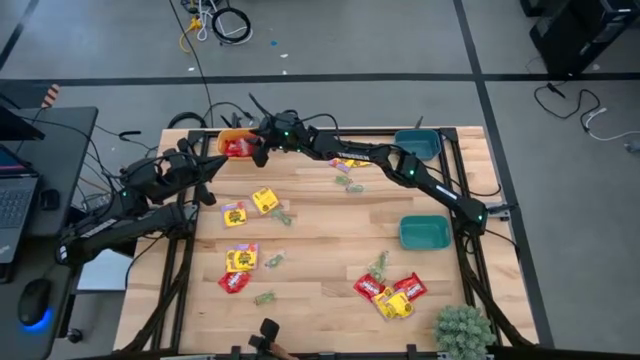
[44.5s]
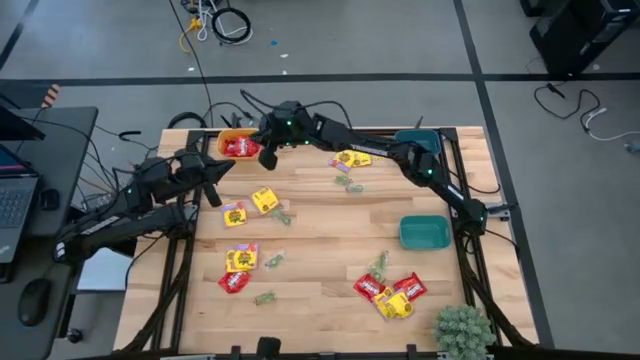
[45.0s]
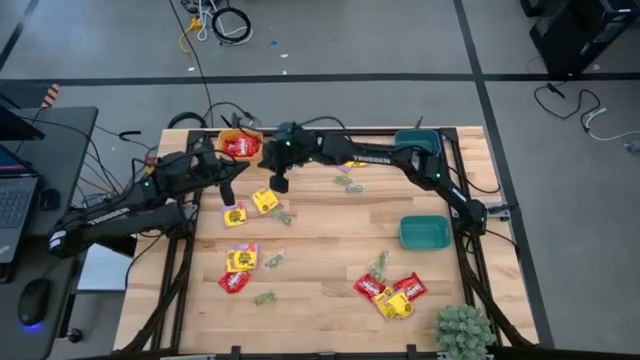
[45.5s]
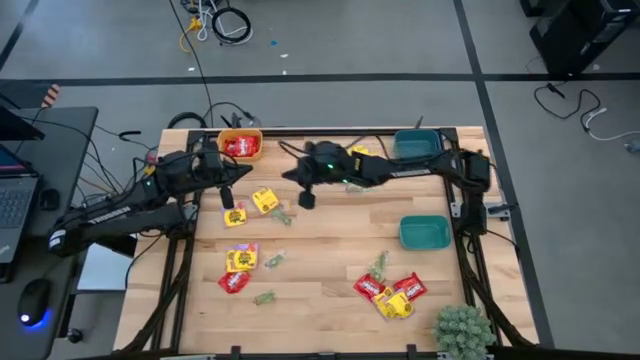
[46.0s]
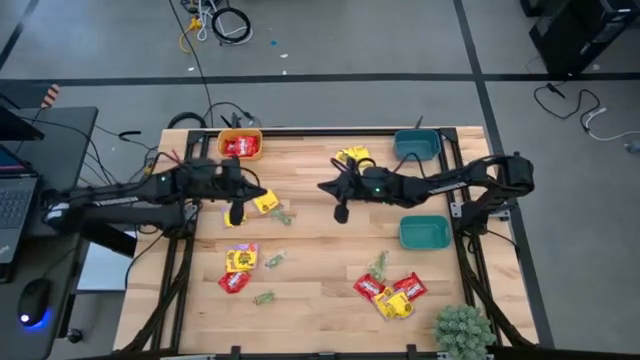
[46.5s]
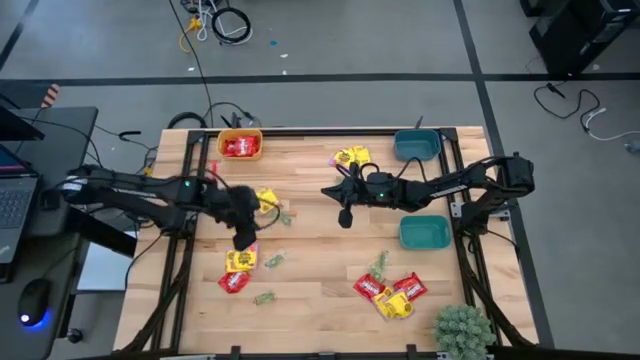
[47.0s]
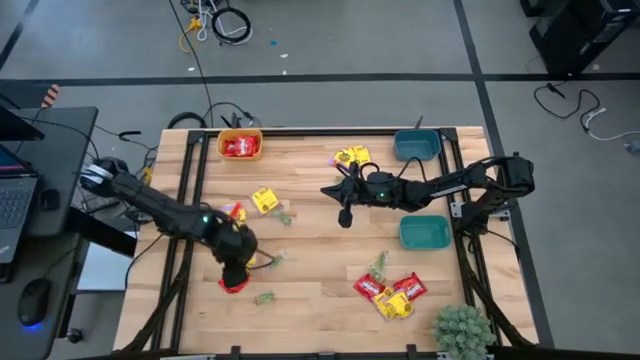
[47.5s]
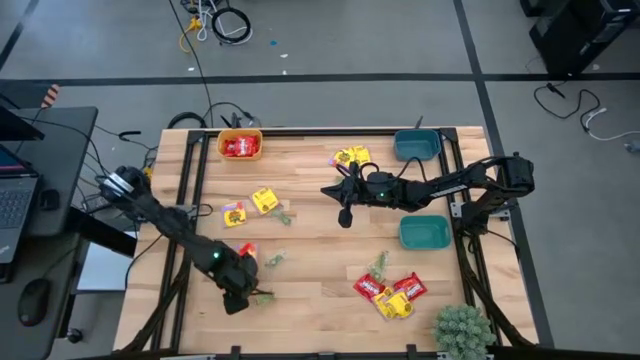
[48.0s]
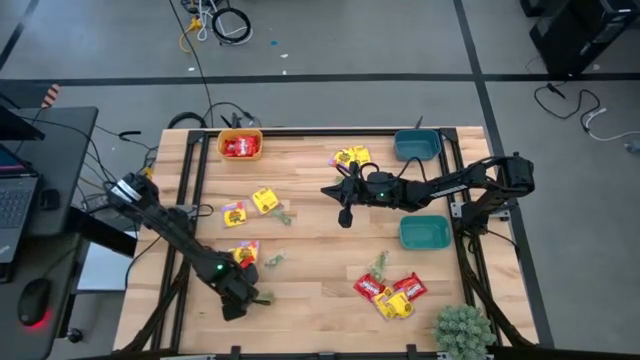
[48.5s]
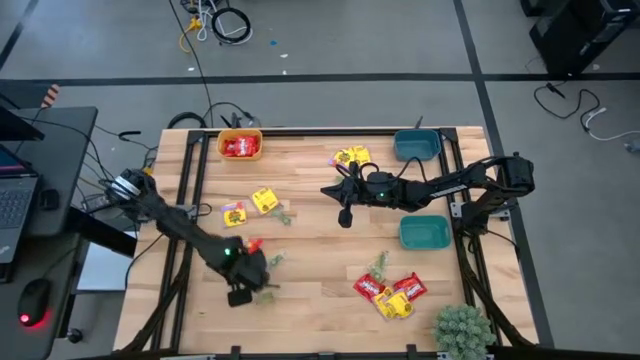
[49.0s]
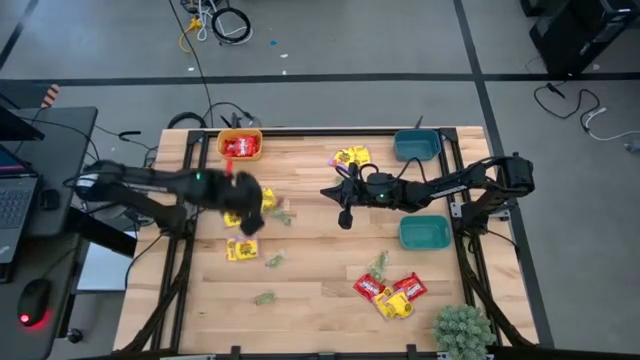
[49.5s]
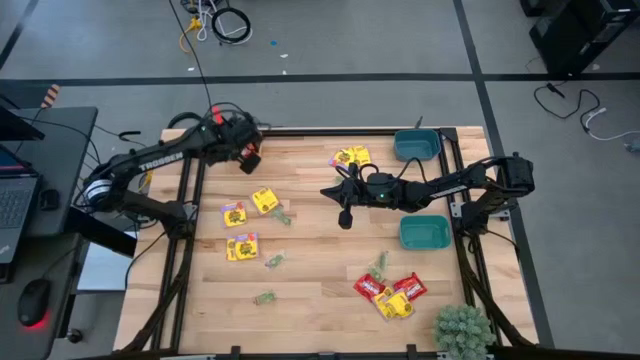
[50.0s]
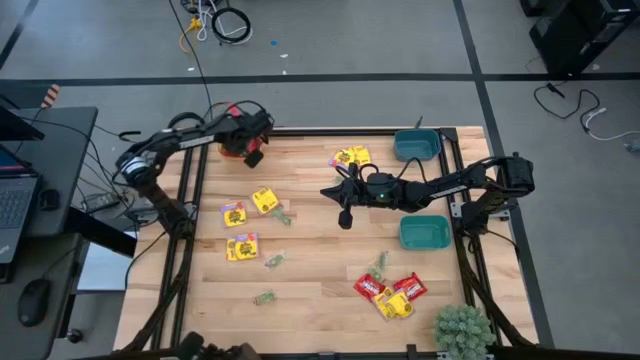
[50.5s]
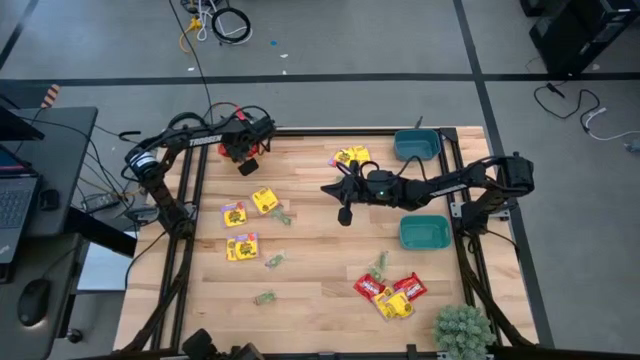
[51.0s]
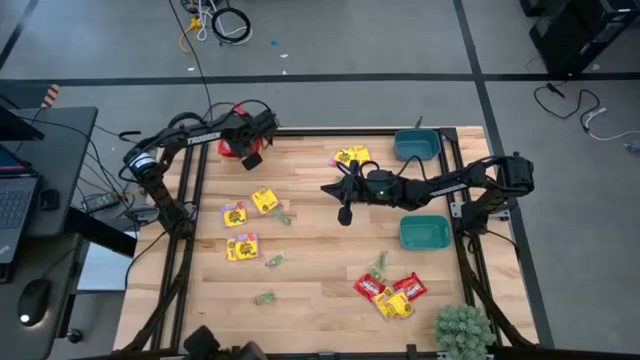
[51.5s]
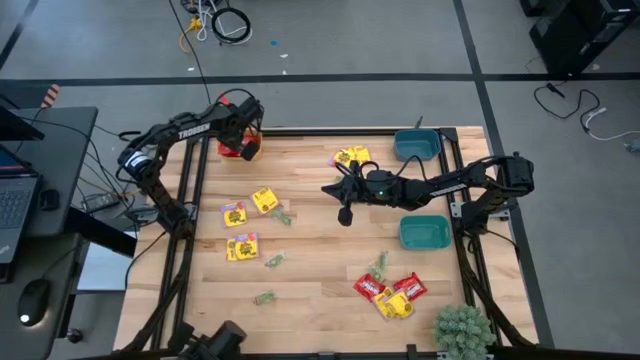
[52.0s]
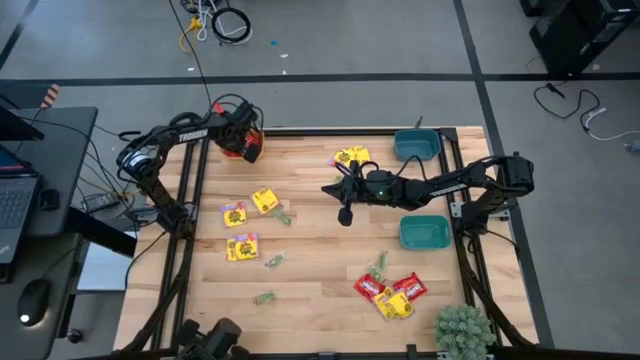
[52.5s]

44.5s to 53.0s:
Task: Sort candy
Put the red candy into the yellow bin

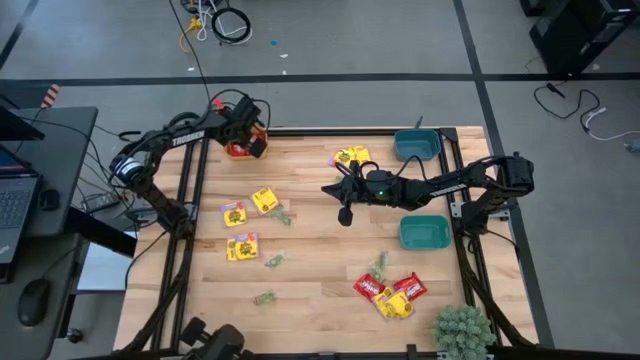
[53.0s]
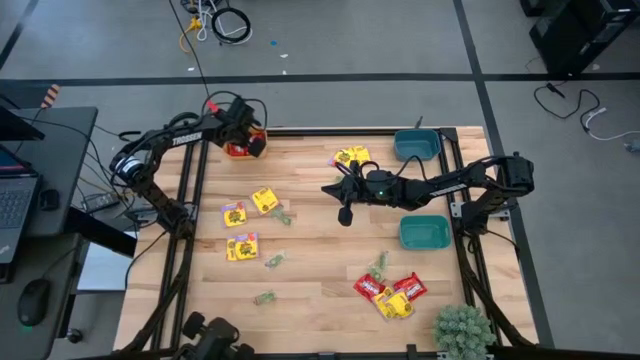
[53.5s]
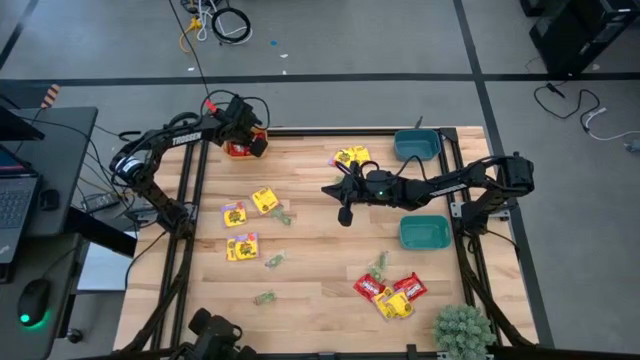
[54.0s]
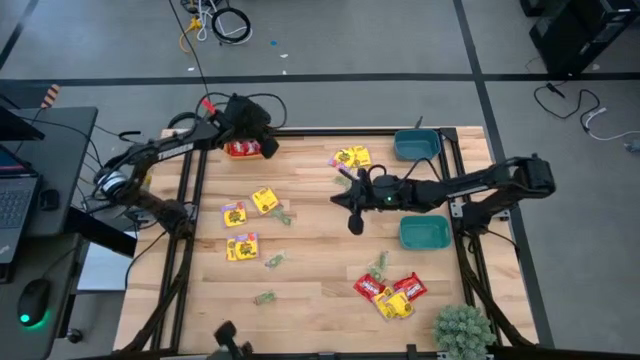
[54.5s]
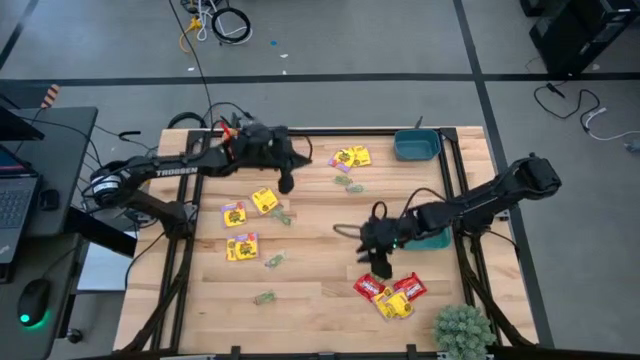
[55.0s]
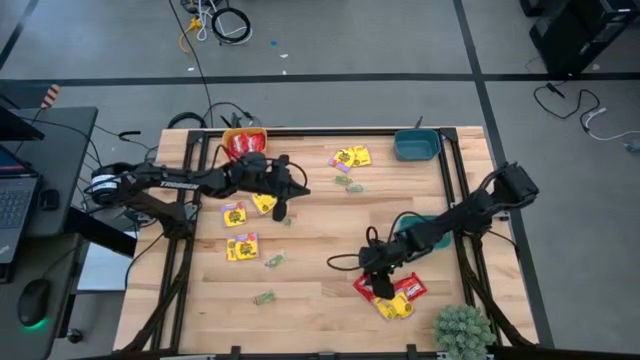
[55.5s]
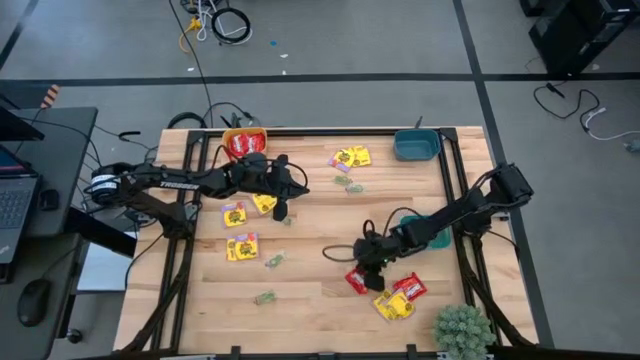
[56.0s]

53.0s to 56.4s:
Put the red candy into the yellow bin

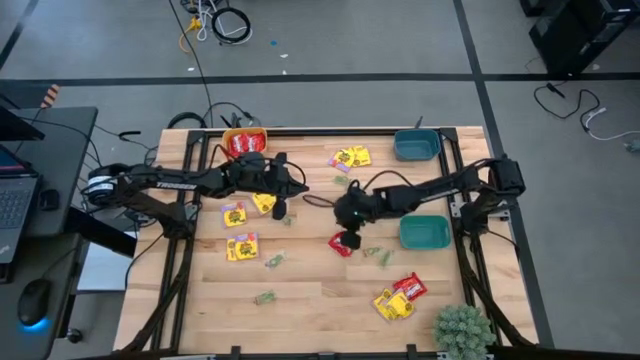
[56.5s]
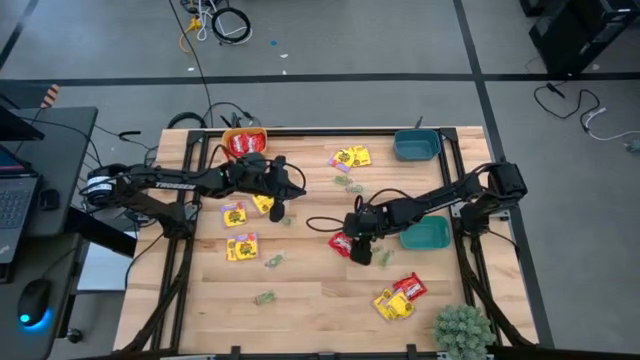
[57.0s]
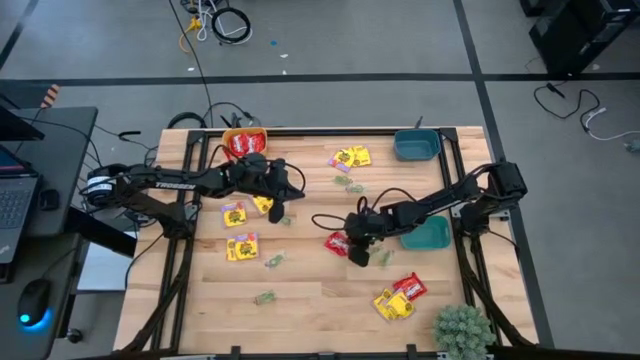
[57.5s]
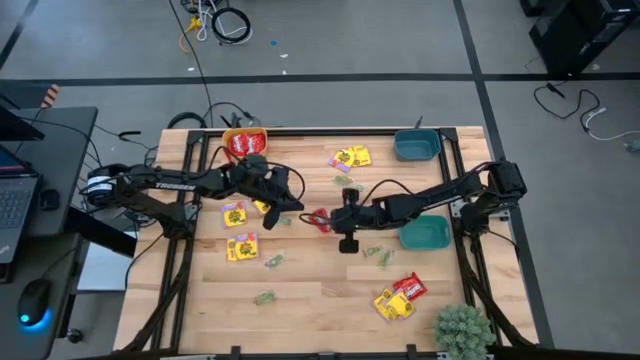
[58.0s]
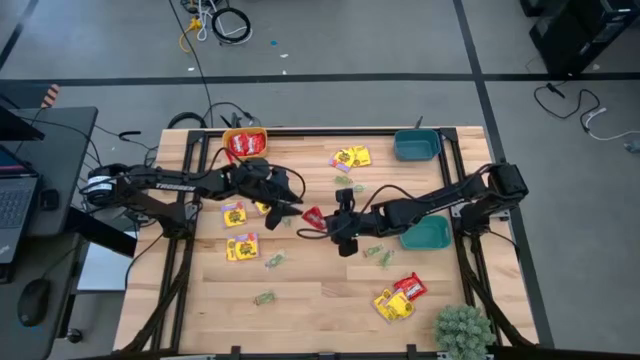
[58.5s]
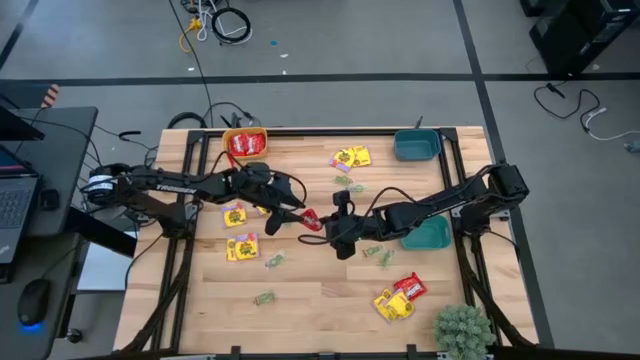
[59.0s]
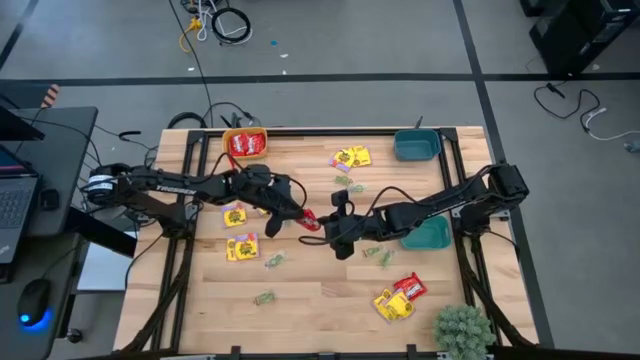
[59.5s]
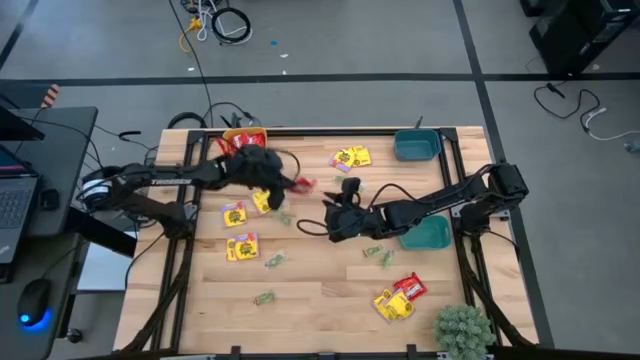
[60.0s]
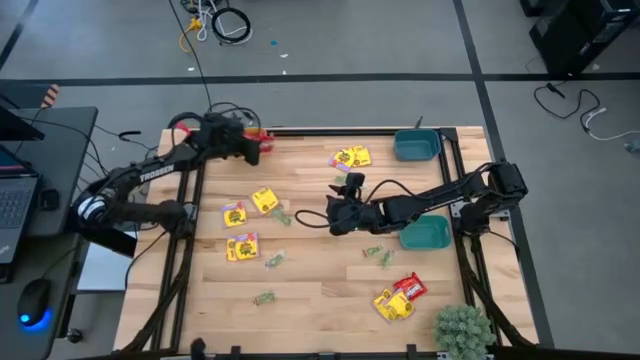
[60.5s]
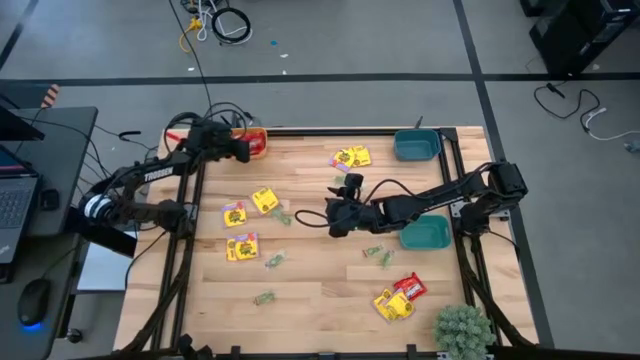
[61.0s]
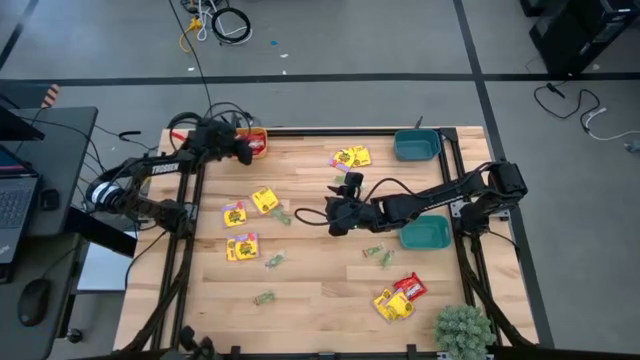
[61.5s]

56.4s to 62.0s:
Put the red candy into the yellow bin

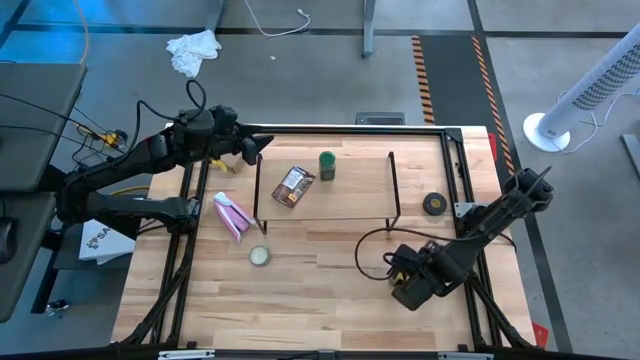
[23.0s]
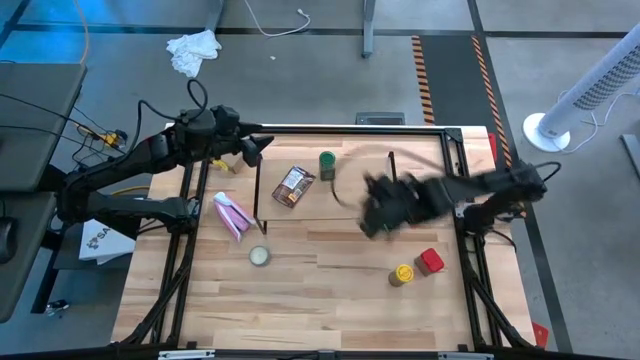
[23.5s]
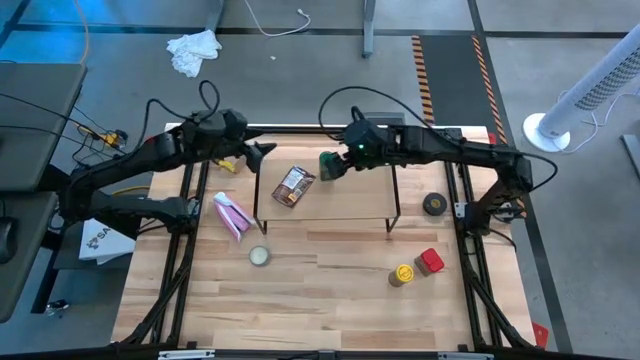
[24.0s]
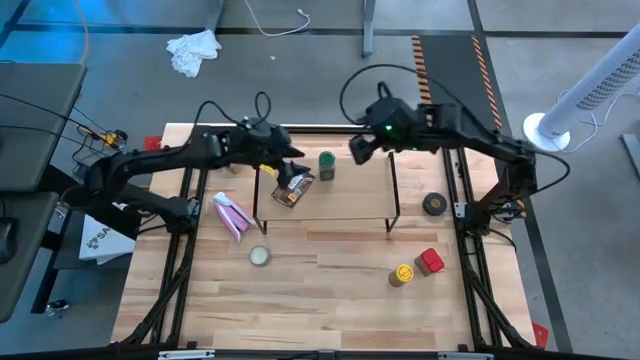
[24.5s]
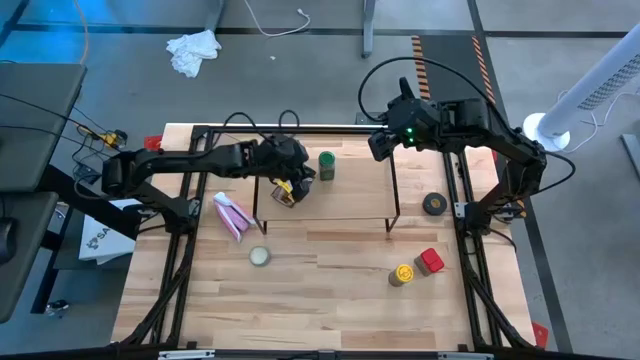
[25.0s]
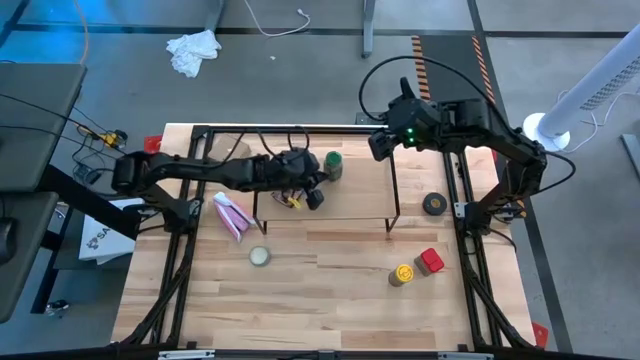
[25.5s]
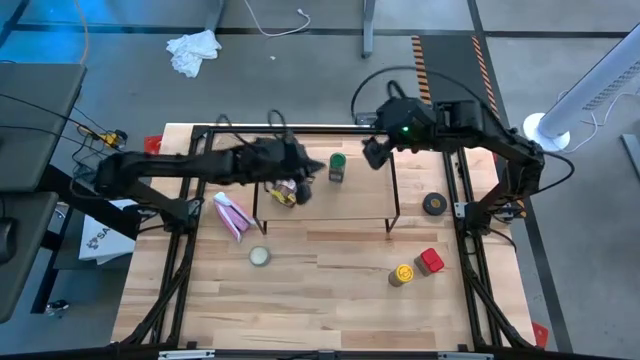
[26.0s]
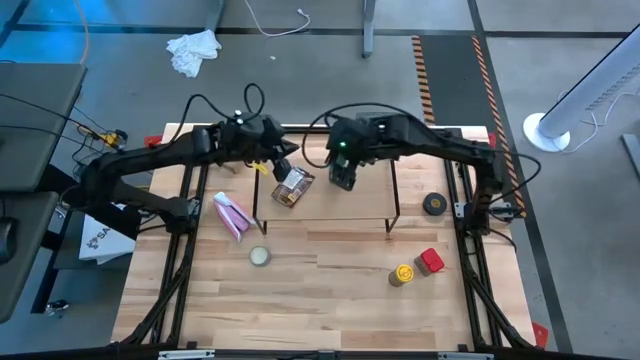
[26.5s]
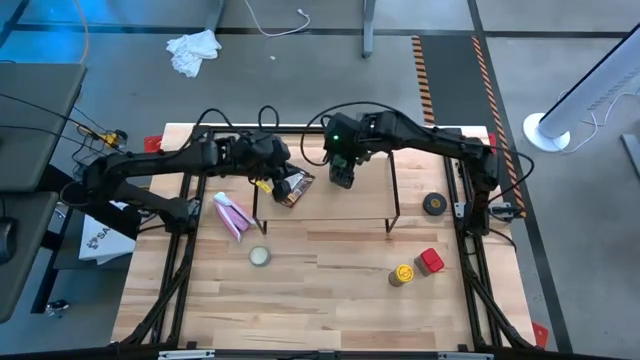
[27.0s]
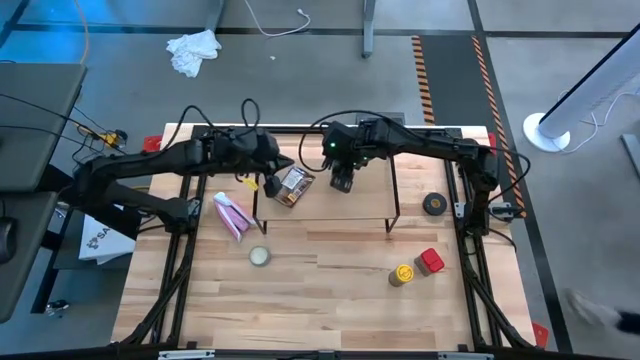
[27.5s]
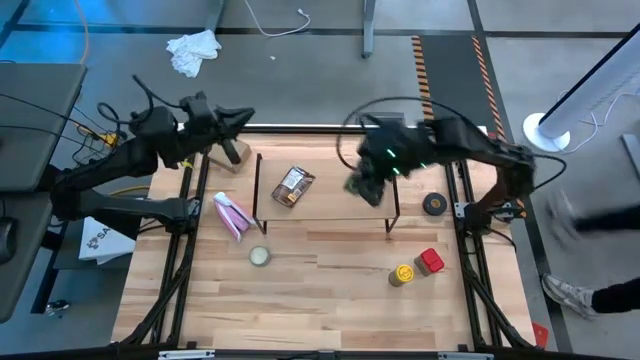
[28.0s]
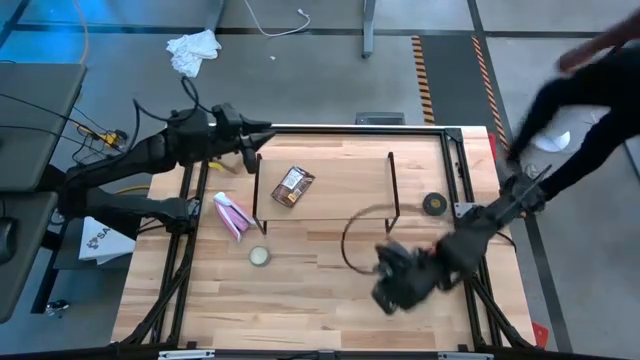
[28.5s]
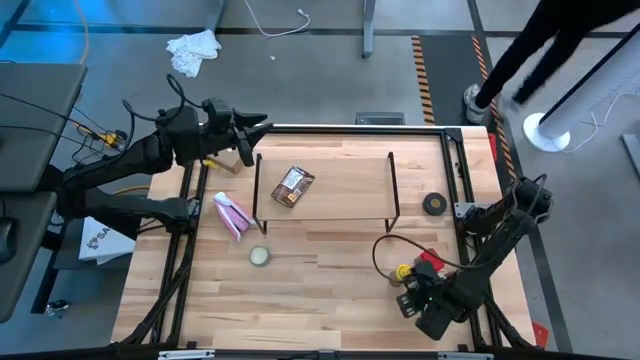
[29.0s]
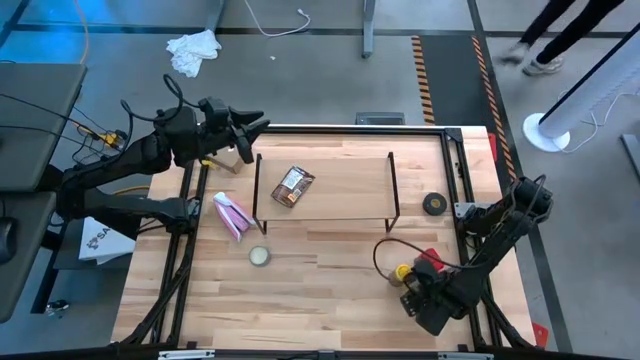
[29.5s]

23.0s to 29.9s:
Task: Shelf spices
Remove the green spice bottle from the shelf
